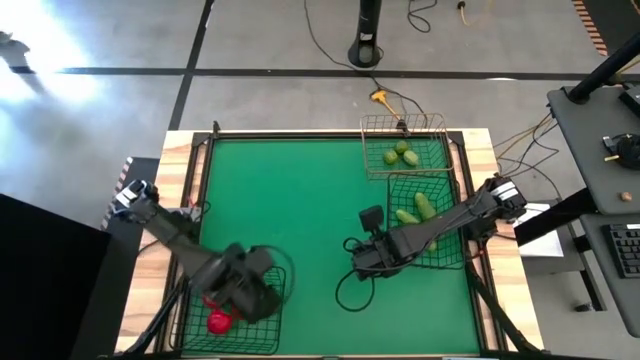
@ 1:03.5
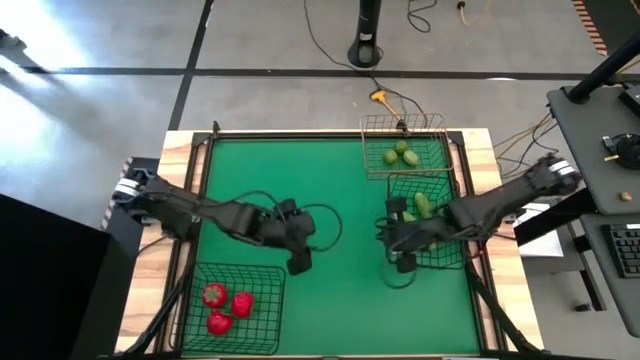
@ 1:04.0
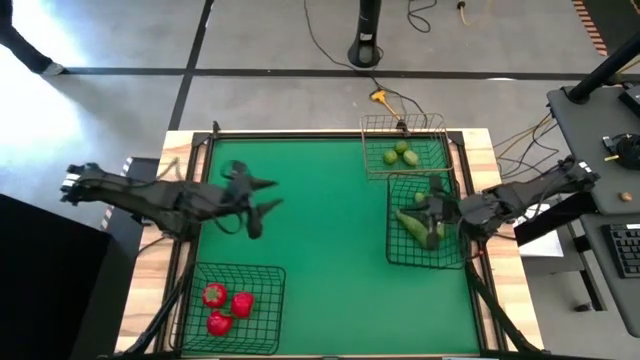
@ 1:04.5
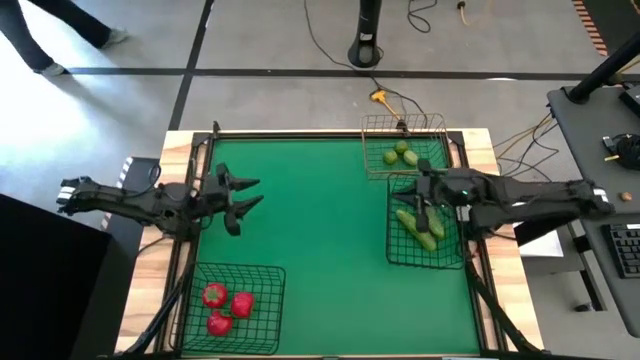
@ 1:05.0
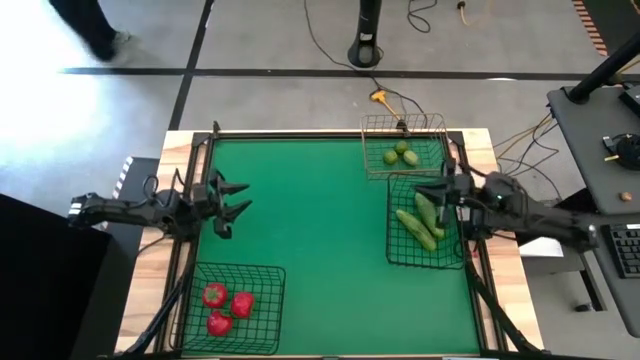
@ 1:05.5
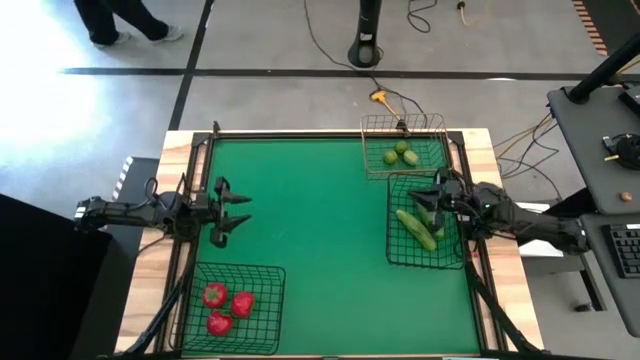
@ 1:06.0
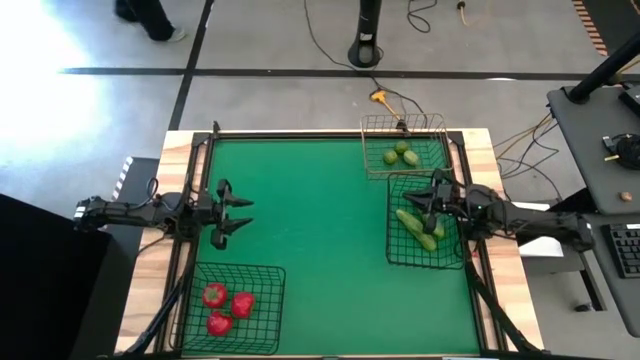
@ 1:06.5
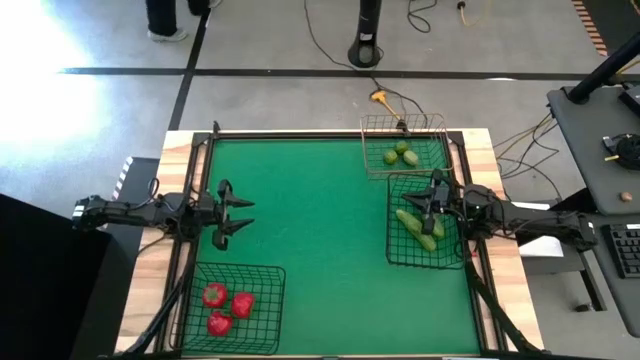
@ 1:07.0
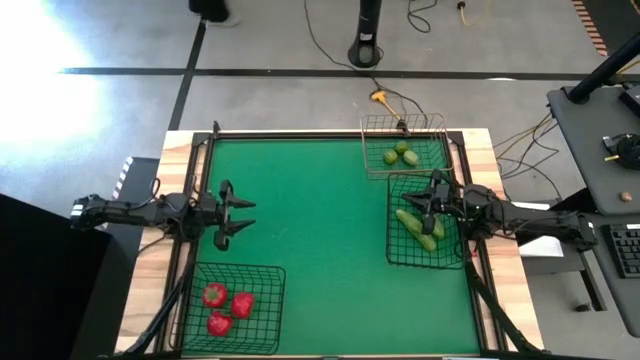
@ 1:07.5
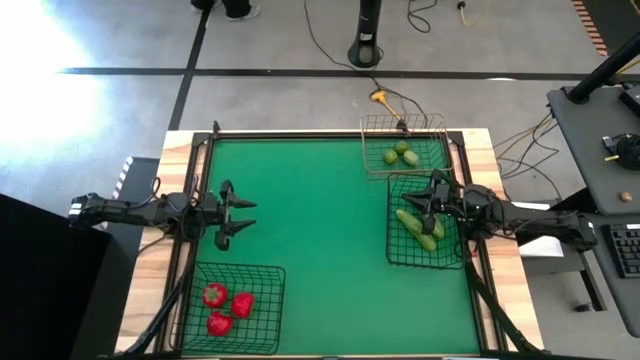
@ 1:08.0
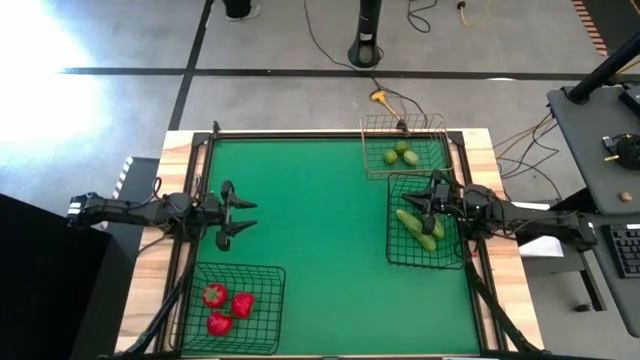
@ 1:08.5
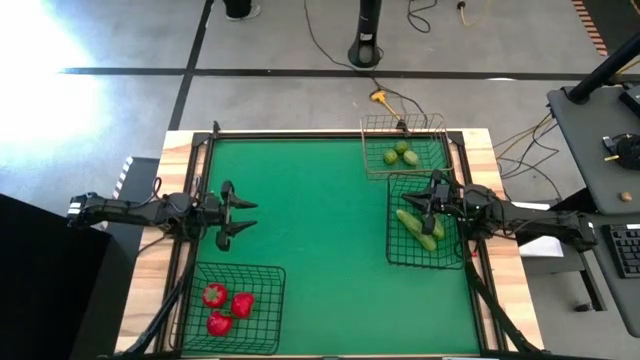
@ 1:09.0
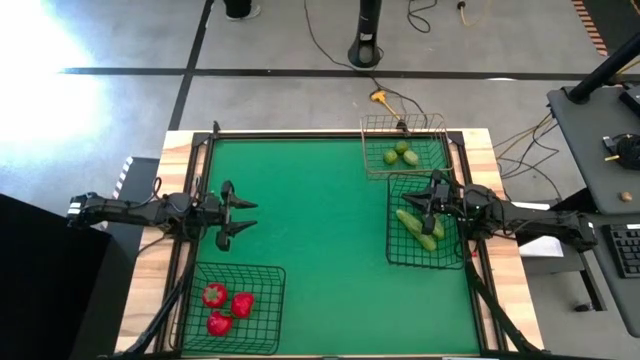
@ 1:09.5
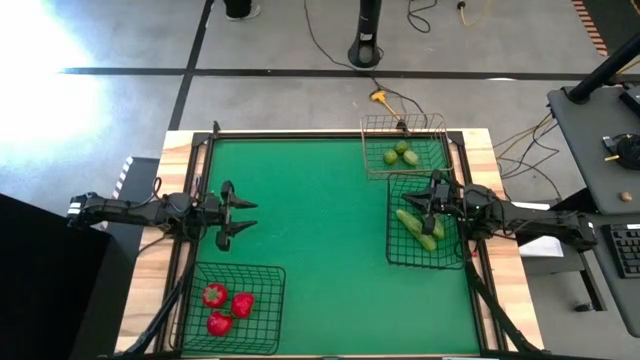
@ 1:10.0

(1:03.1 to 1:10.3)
Task: Sort produce into baskets
Return to Home Position

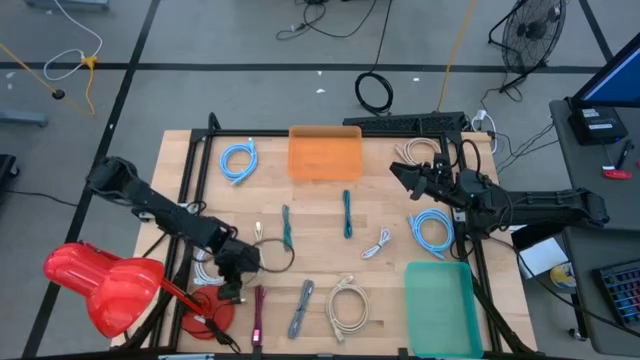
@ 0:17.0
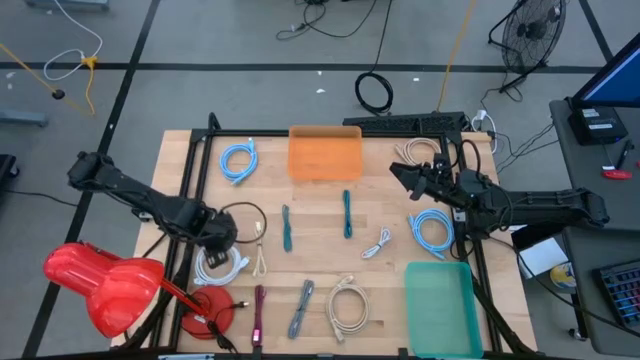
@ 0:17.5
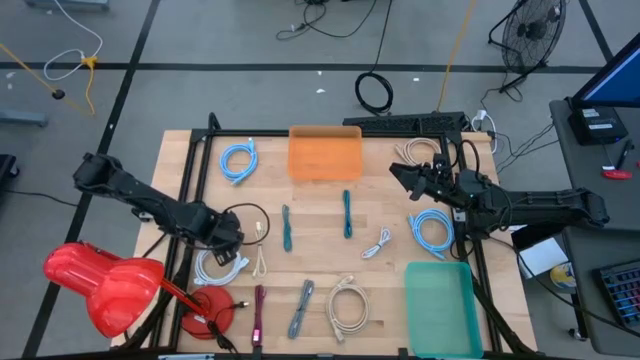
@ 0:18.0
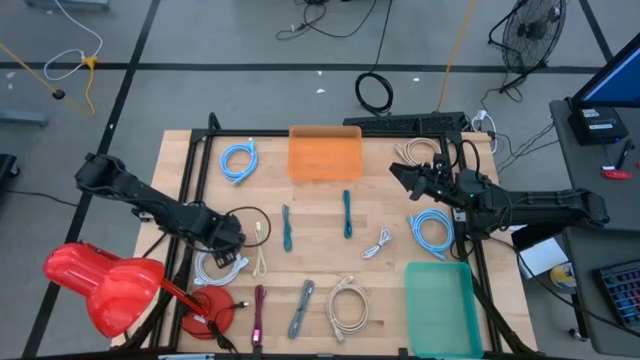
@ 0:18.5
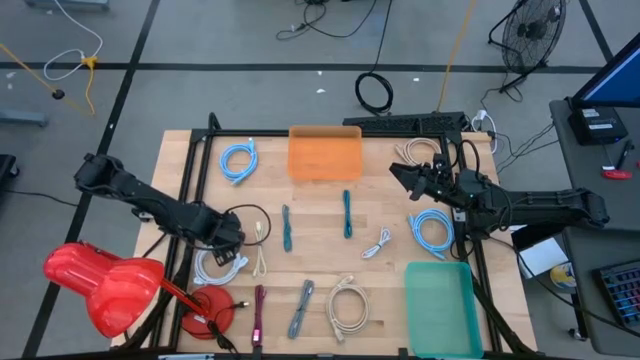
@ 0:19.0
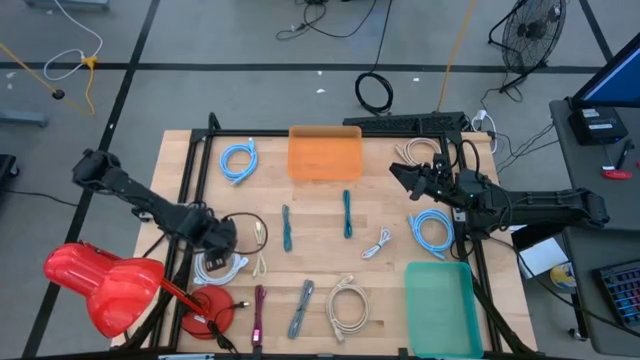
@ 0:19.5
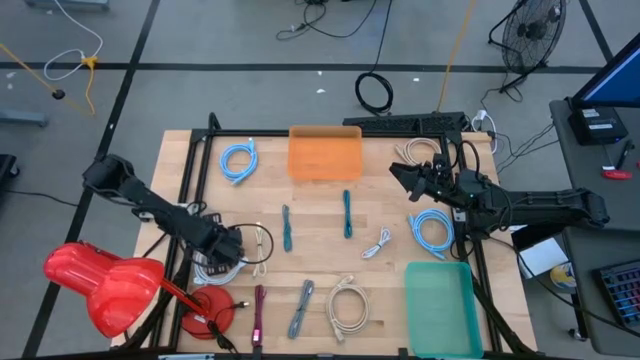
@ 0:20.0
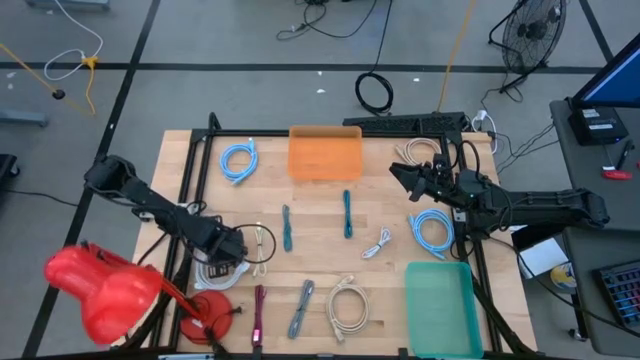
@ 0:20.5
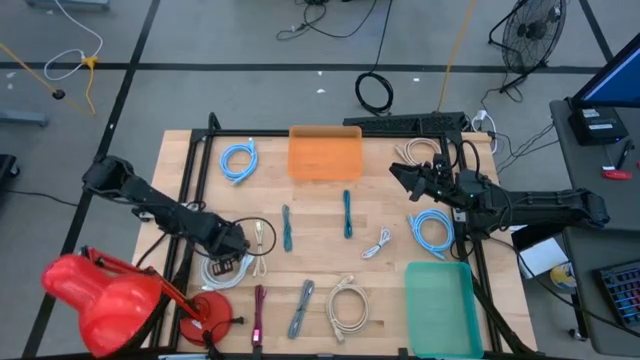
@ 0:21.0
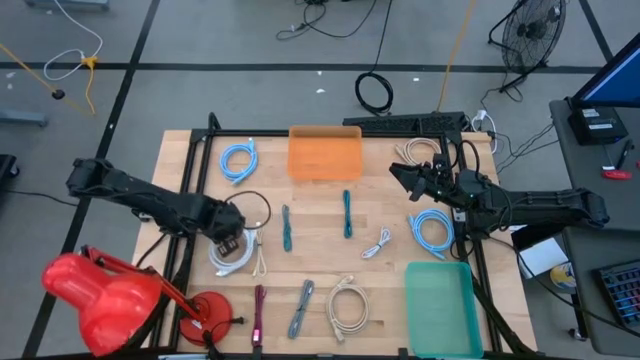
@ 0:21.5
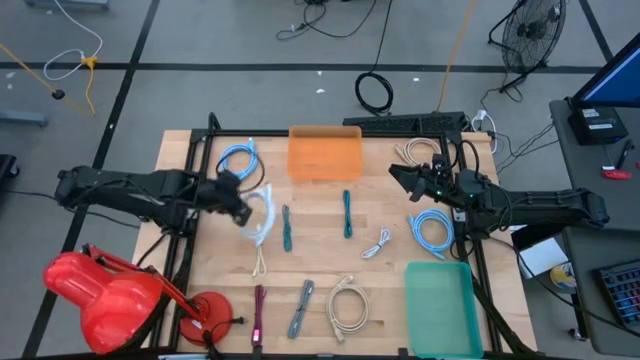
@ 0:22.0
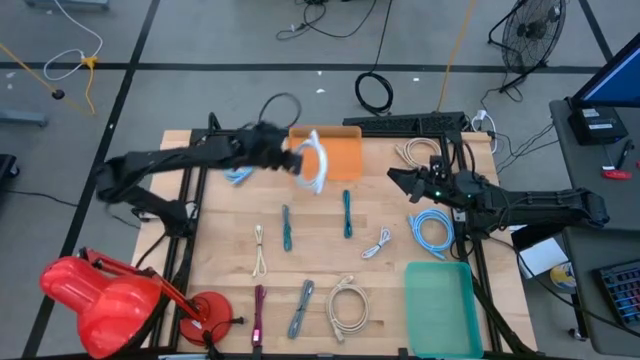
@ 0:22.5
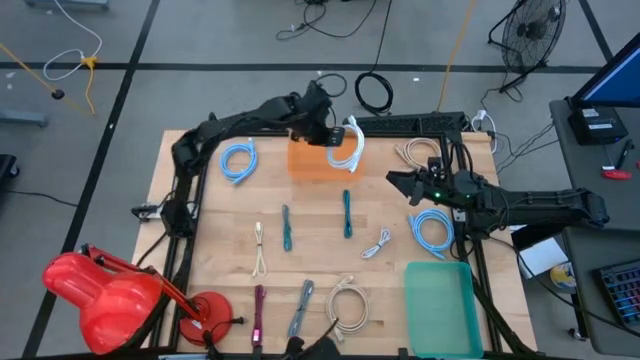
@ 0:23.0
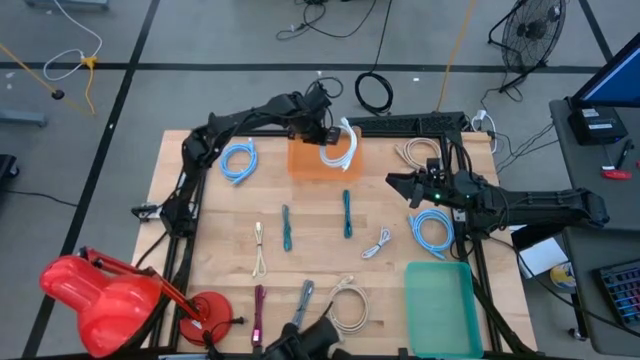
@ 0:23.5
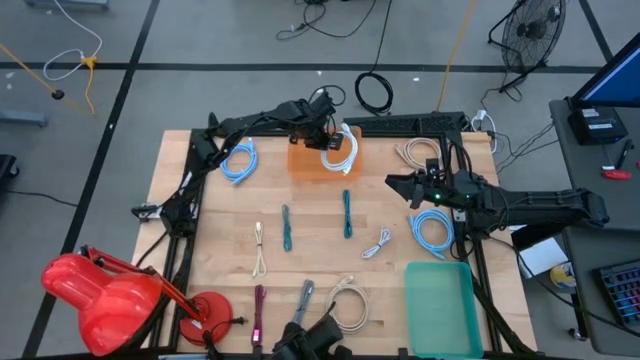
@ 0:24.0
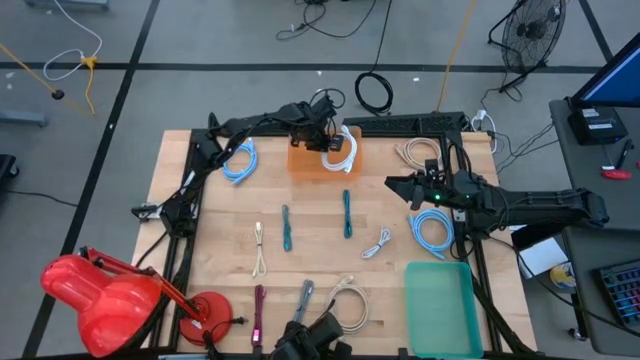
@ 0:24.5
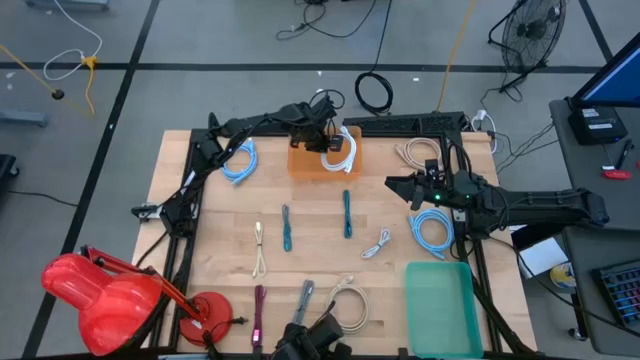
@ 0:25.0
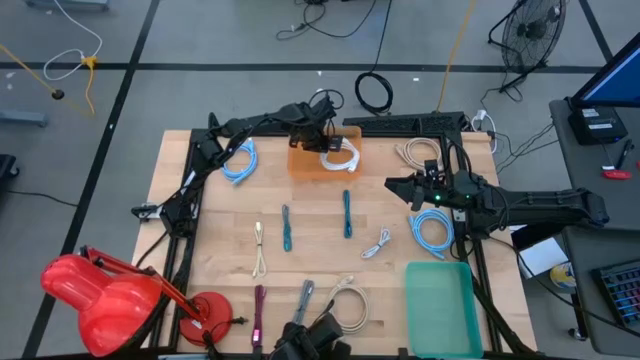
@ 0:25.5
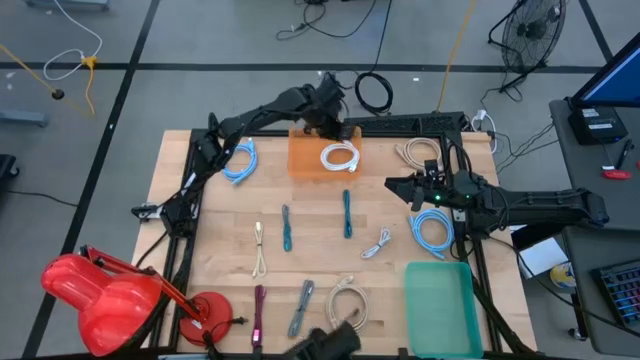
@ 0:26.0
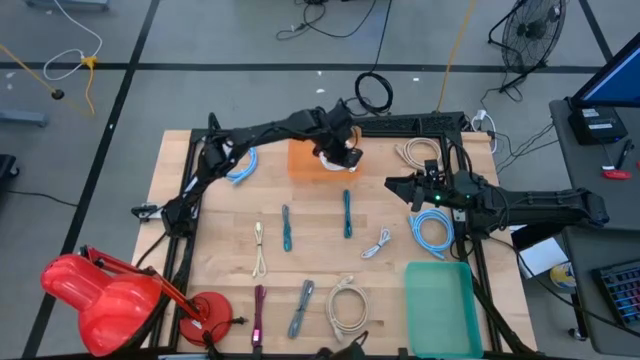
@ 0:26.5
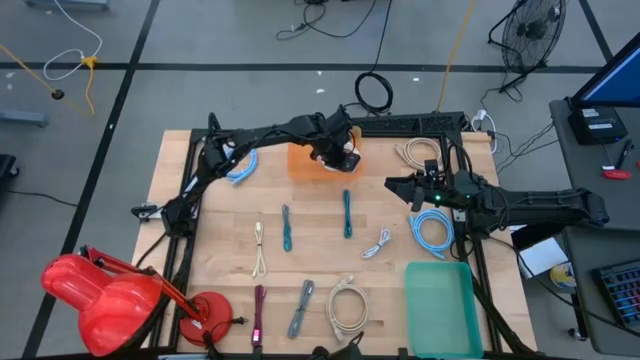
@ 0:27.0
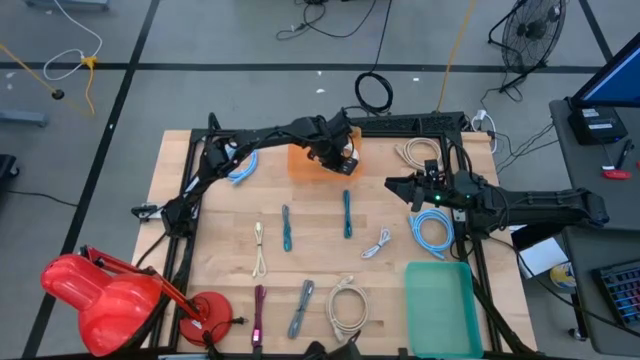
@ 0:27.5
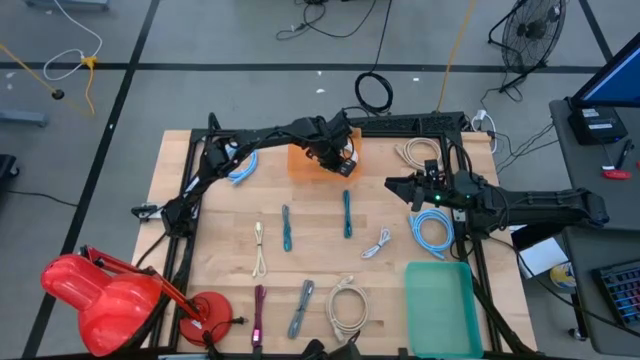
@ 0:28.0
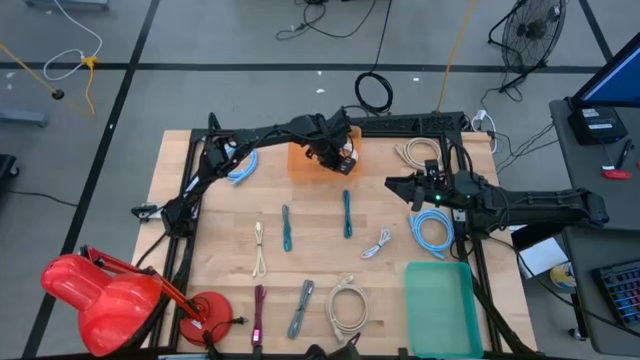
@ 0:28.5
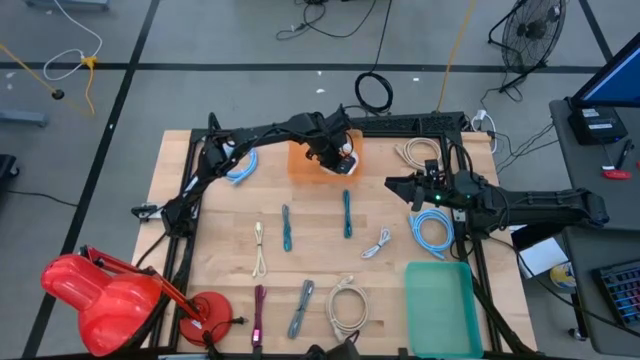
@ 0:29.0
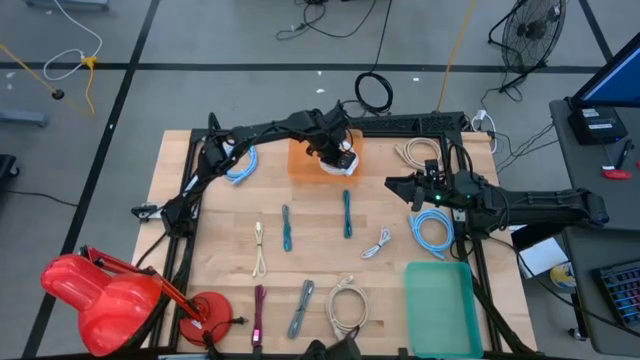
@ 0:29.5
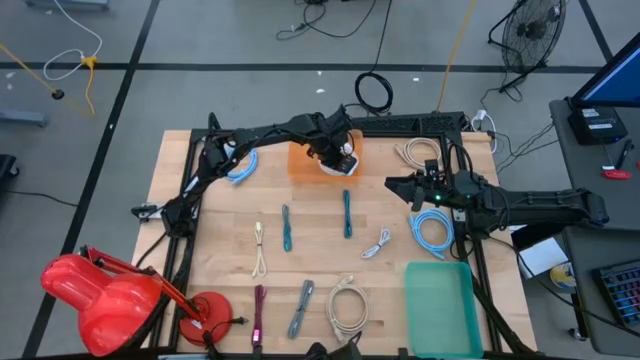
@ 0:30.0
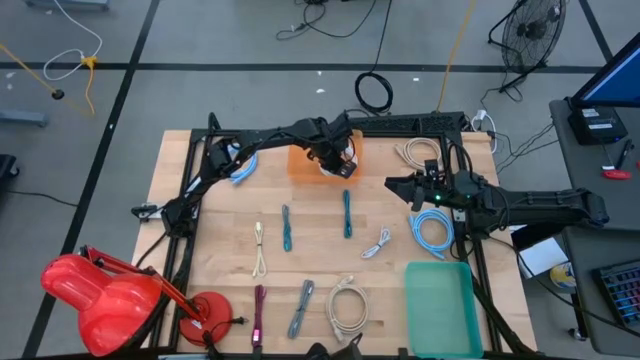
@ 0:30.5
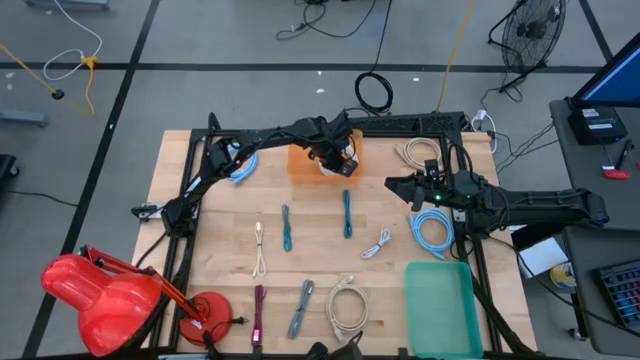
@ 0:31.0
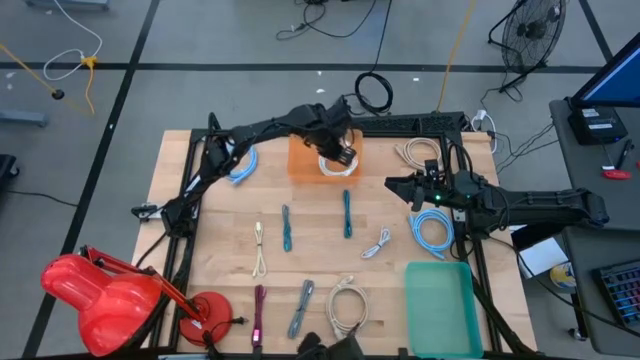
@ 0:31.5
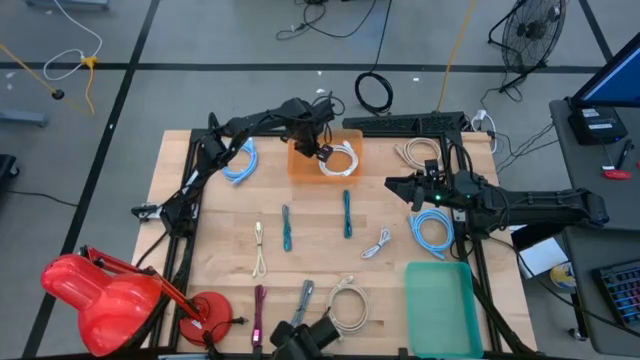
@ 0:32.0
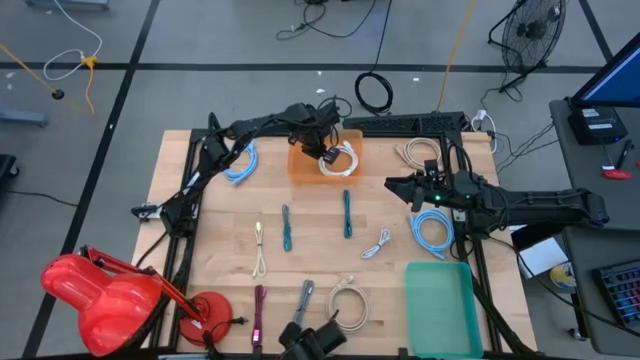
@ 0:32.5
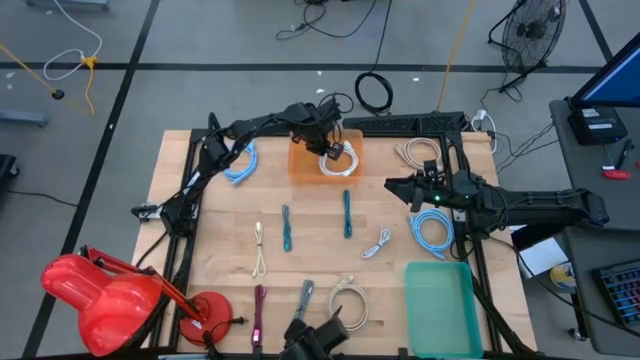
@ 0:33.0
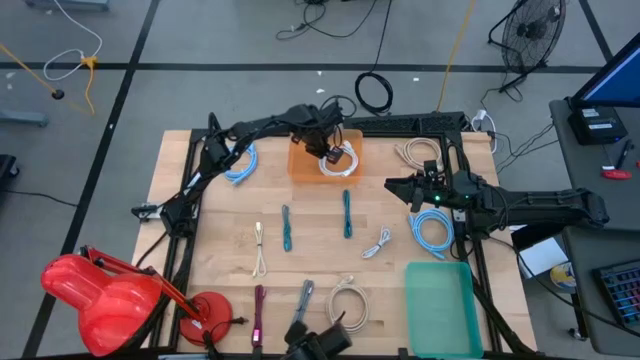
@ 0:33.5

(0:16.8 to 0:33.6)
Task: Pick & Place USB Port
Put the large white charger cable into the orange bin
